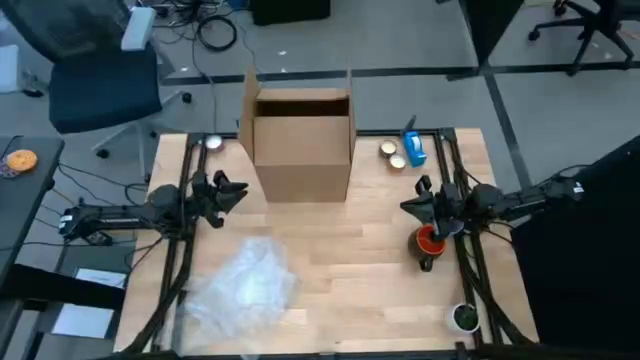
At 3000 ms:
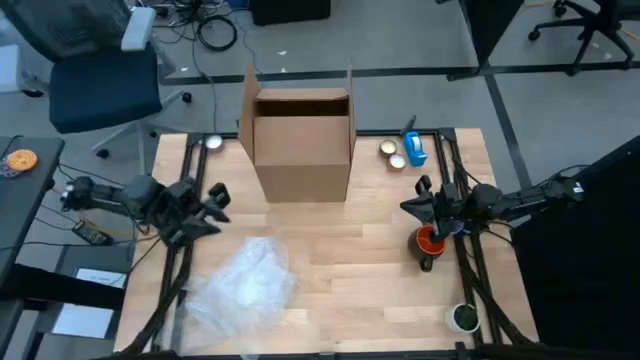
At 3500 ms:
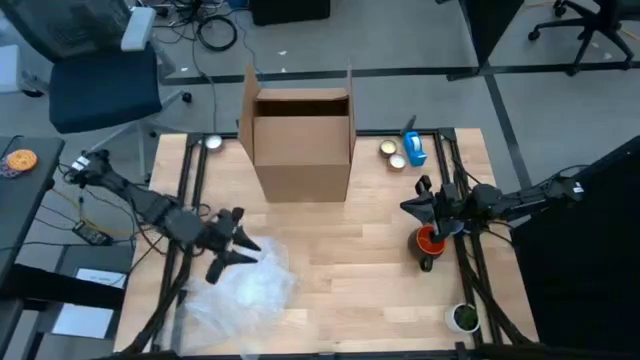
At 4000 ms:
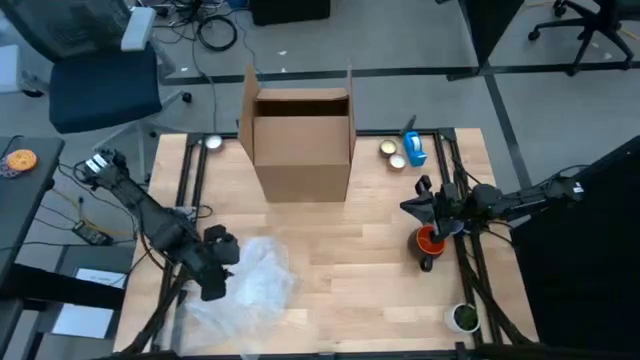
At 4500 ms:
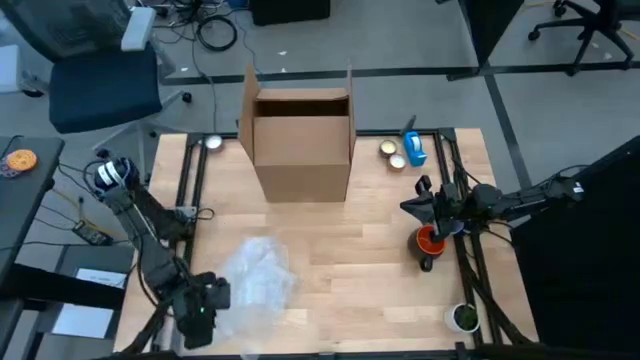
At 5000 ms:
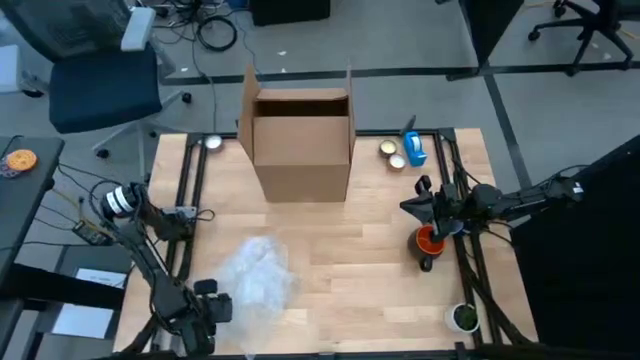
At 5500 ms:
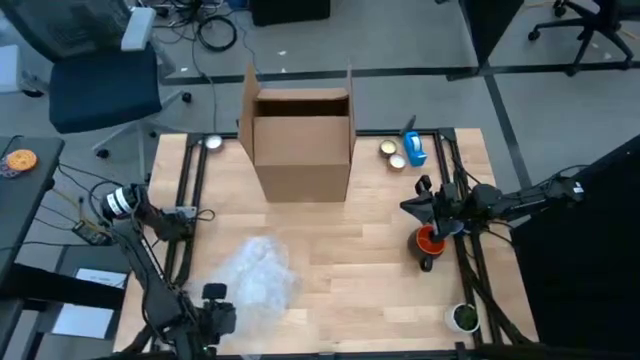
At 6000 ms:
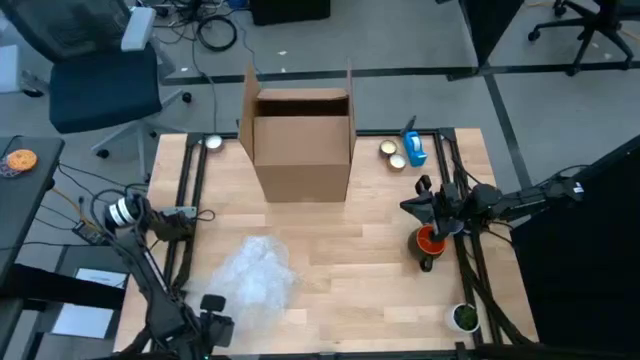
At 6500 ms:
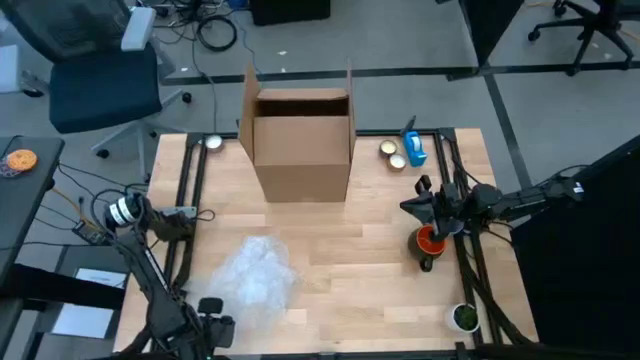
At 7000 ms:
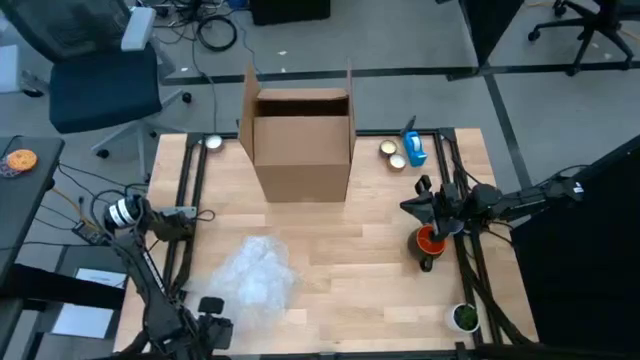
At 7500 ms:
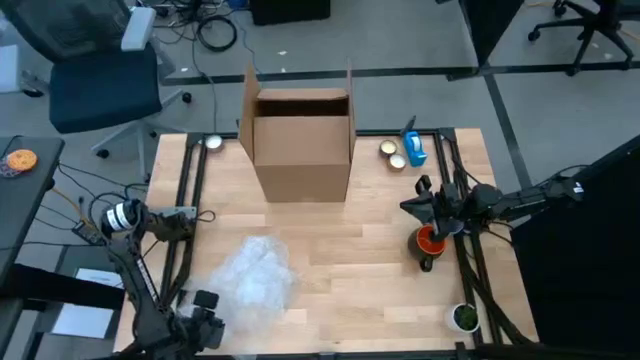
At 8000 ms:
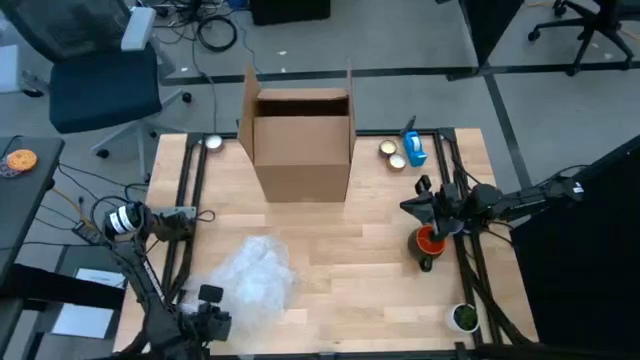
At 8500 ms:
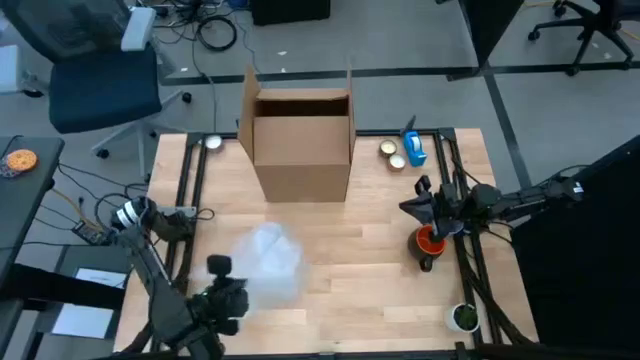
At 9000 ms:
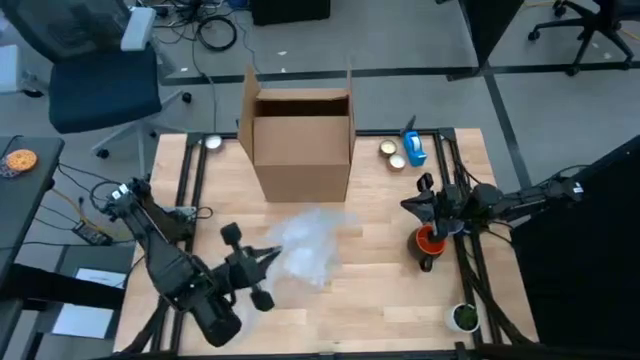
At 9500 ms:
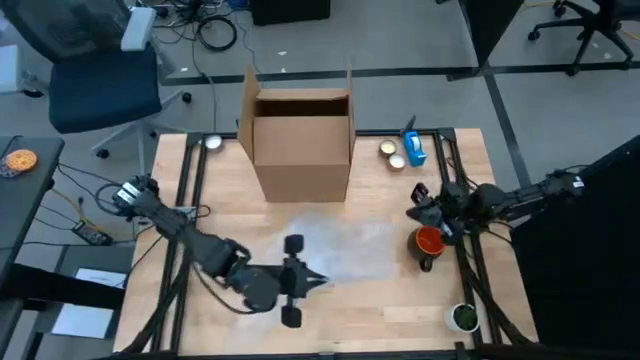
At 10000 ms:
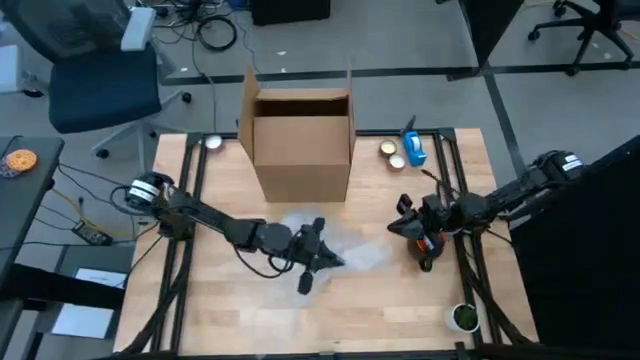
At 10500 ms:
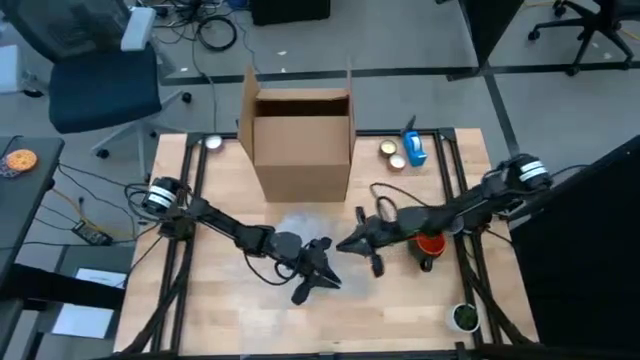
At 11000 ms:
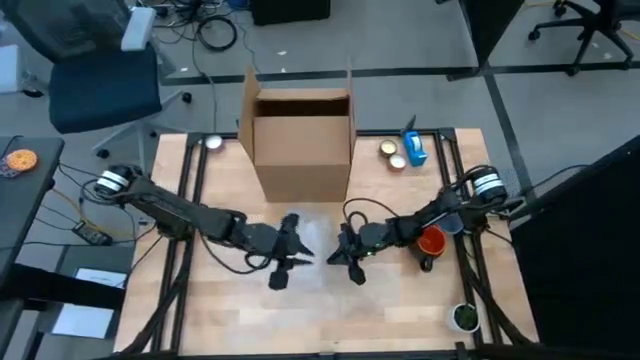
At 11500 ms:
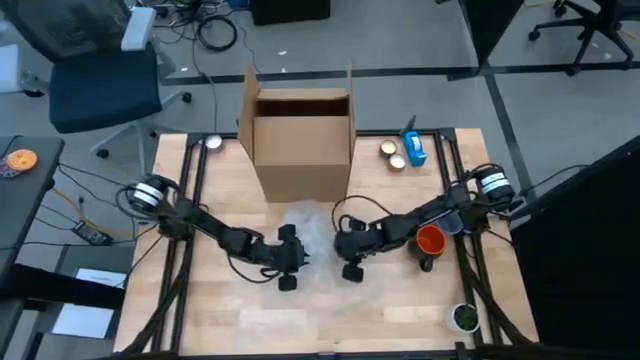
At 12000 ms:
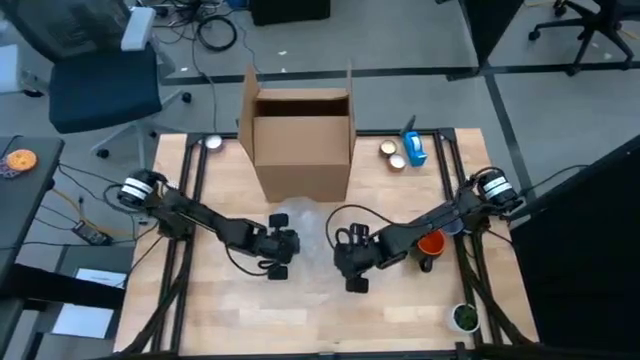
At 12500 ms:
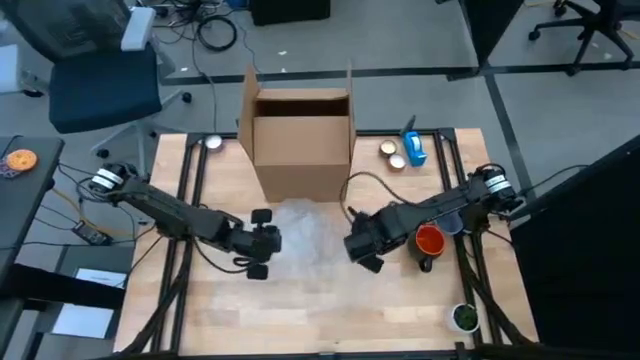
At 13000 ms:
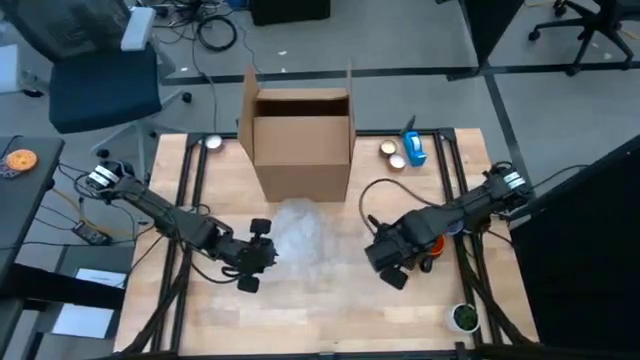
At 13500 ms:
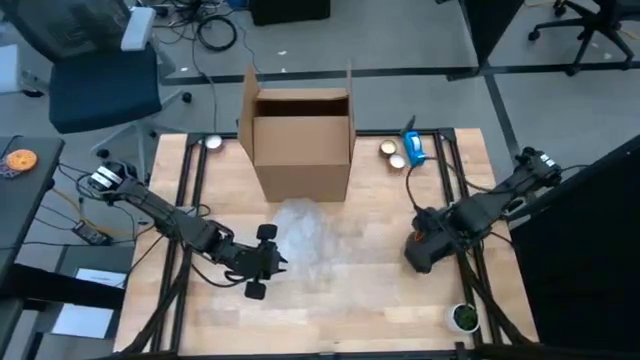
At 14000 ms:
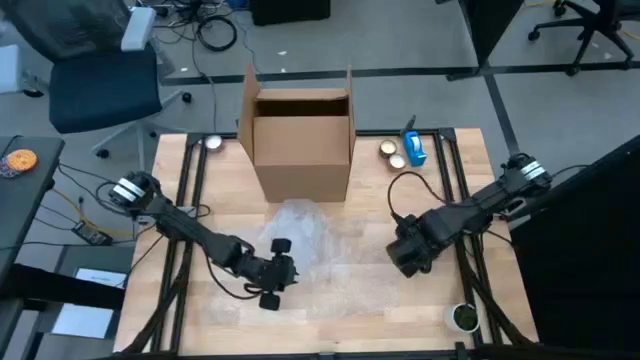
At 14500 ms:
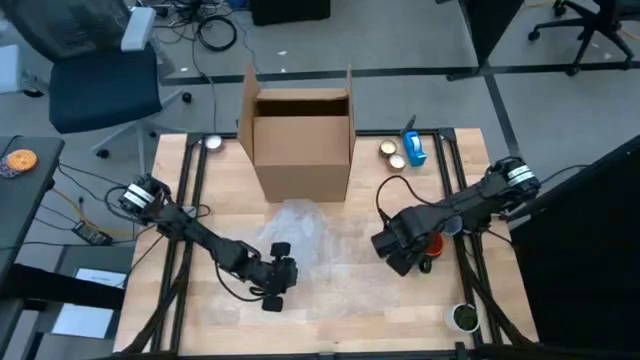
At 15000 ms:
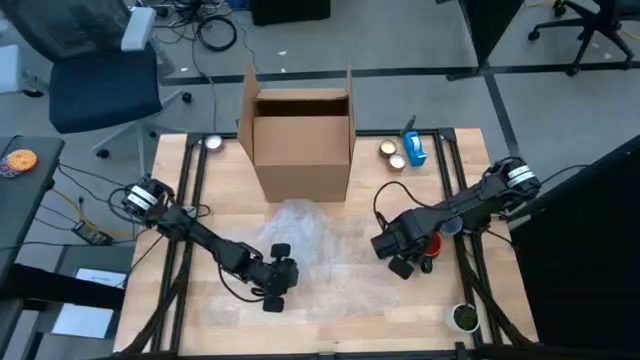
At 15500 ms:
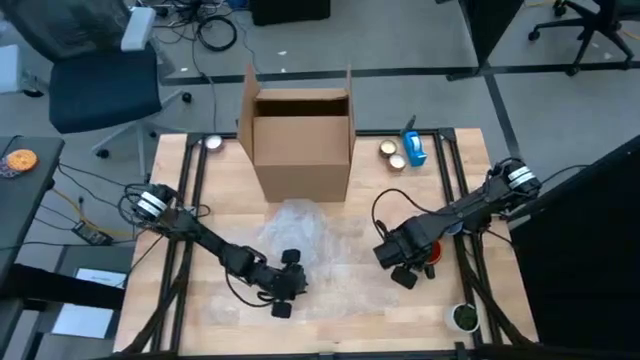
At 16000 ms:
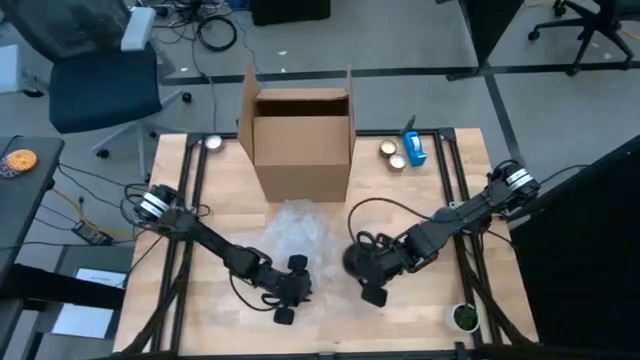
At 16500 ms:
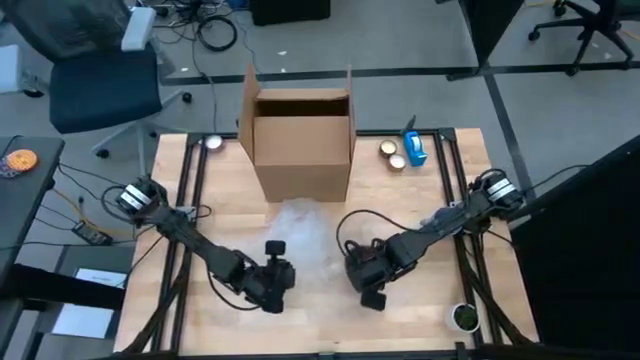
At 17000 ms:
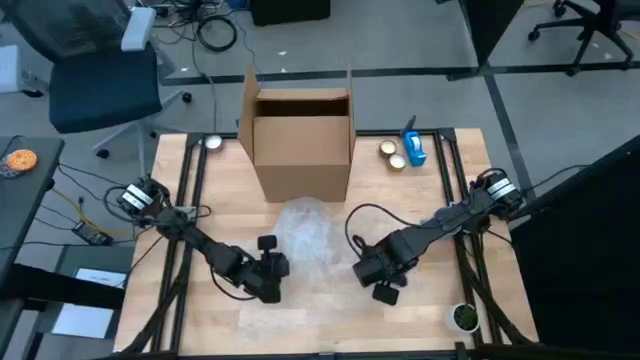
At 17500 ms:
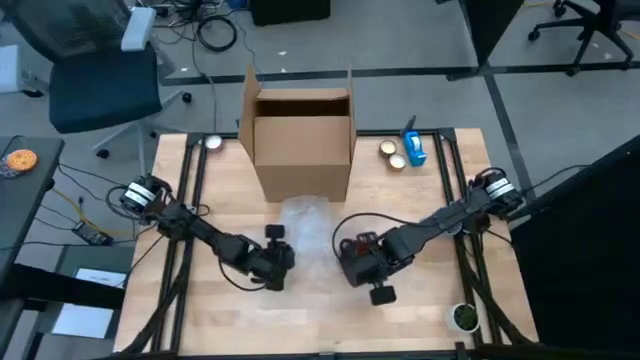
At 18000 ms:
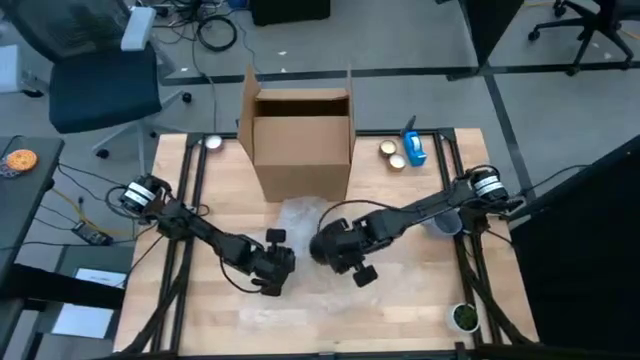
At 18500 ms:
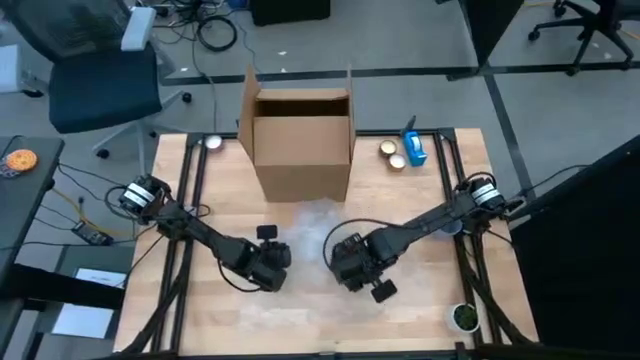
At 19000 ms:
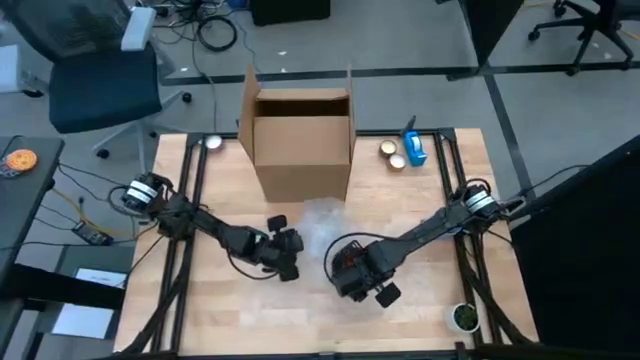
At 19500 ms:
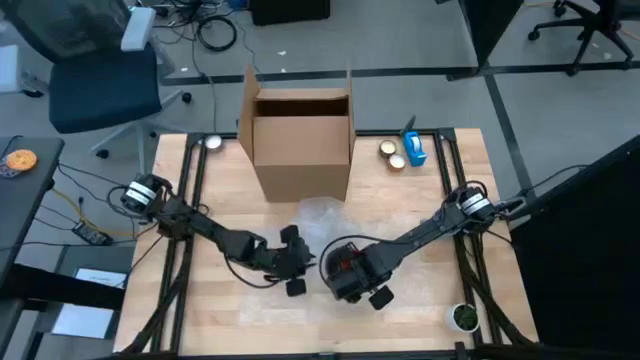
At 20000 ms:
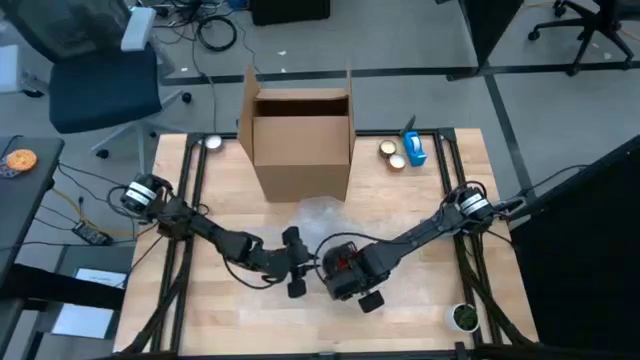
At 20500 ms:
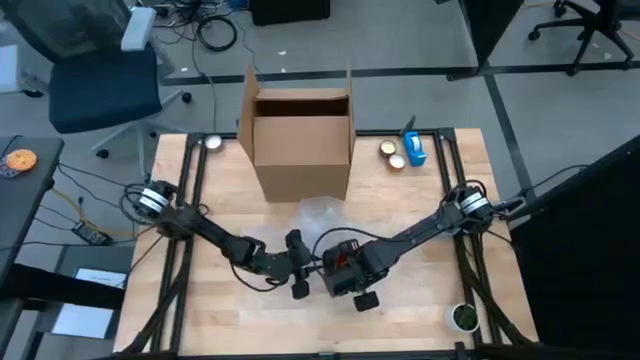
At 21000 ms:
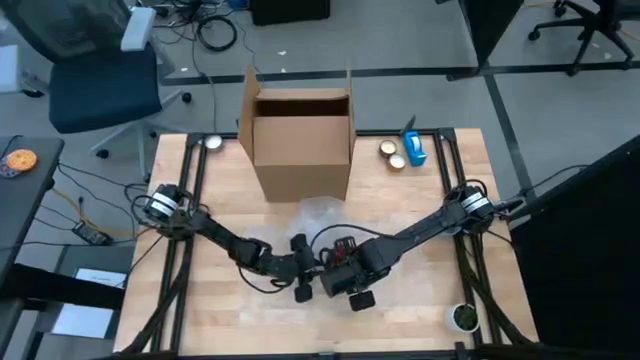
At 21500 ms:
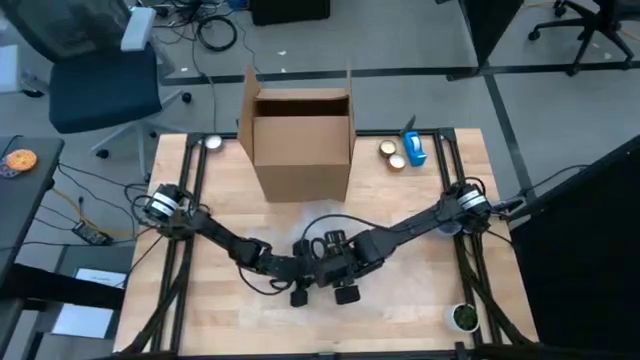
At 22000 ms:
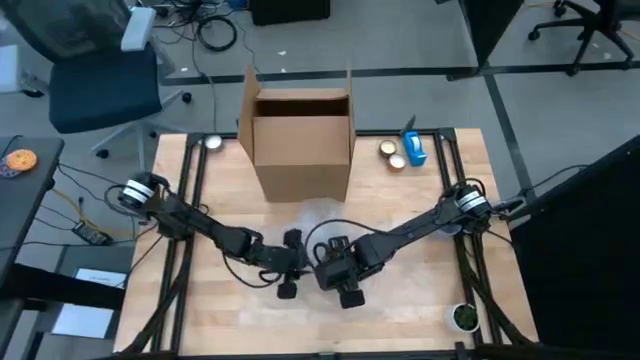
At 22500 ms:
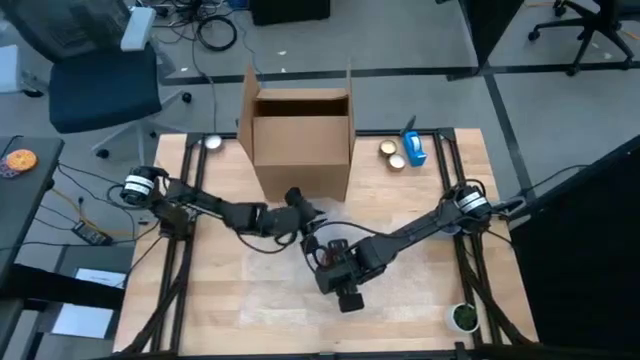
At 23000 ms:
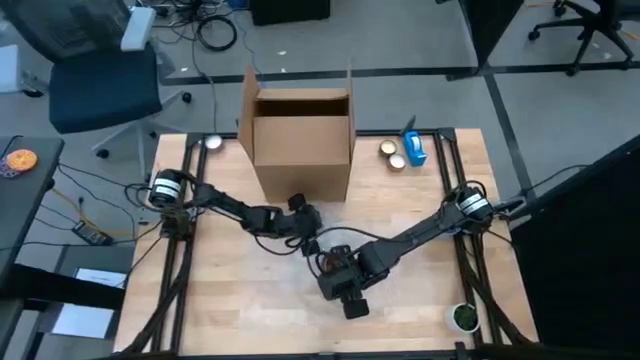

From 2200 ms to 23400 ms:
Task: wrap mug
Wrap the orange mug with bubble wrap
